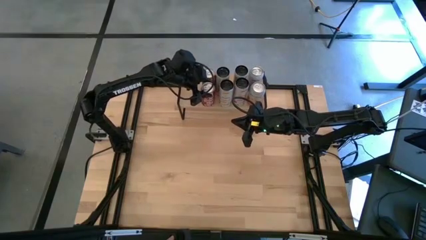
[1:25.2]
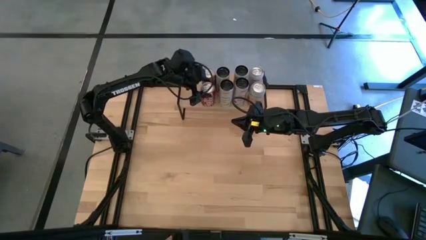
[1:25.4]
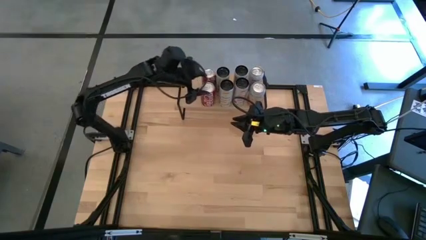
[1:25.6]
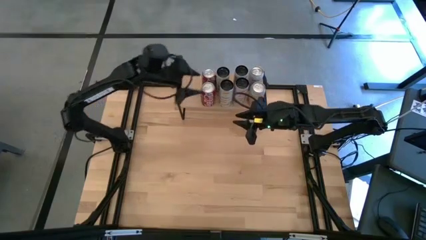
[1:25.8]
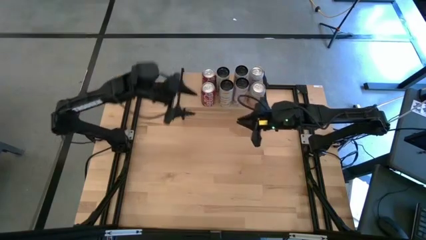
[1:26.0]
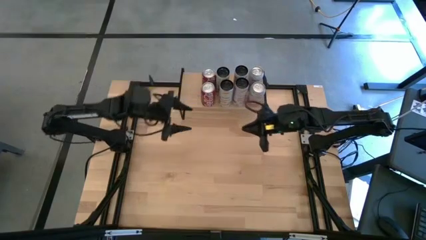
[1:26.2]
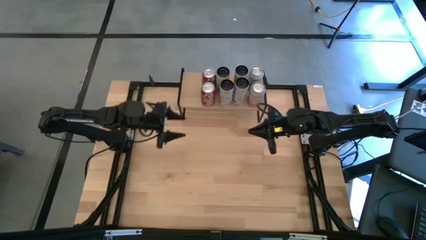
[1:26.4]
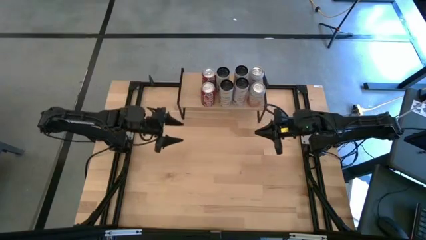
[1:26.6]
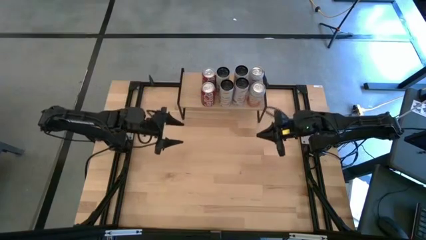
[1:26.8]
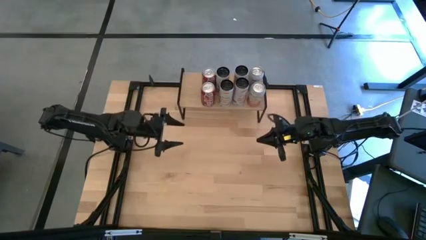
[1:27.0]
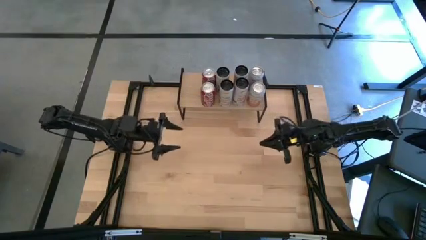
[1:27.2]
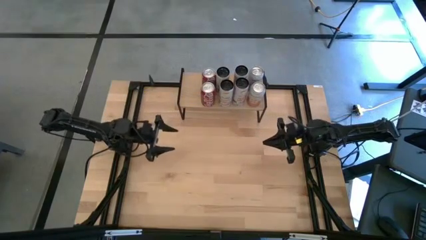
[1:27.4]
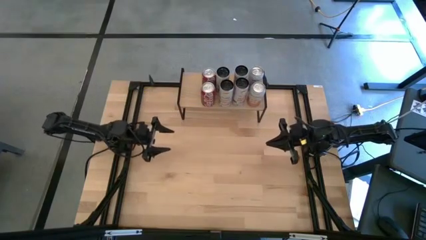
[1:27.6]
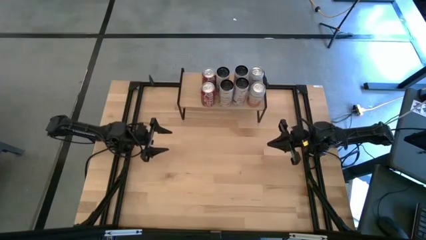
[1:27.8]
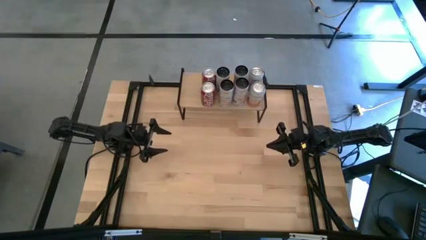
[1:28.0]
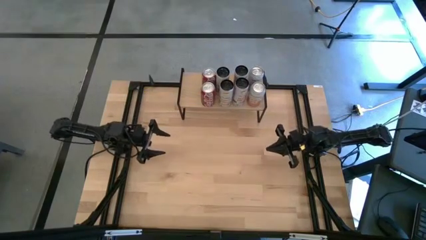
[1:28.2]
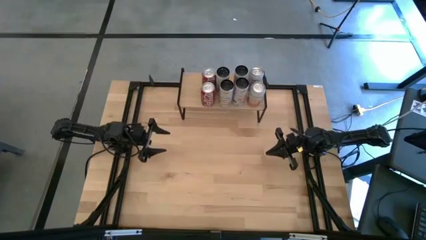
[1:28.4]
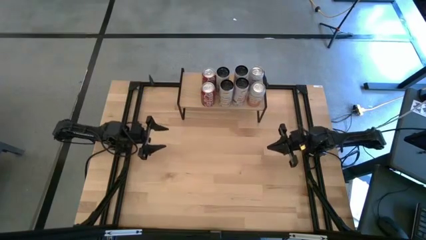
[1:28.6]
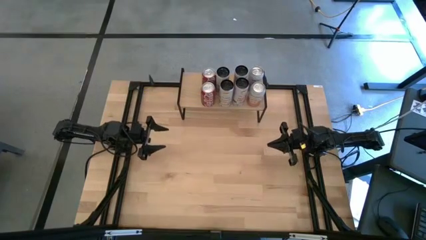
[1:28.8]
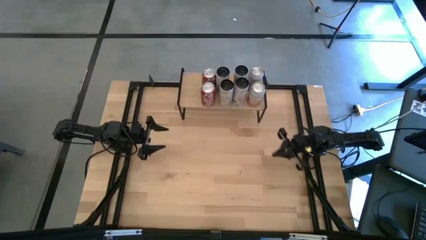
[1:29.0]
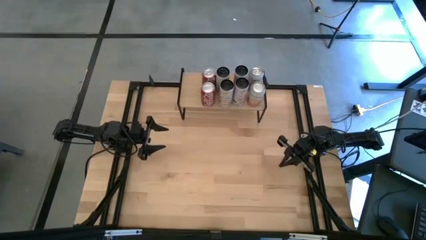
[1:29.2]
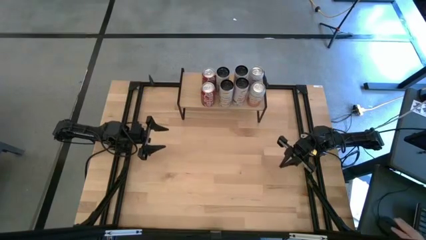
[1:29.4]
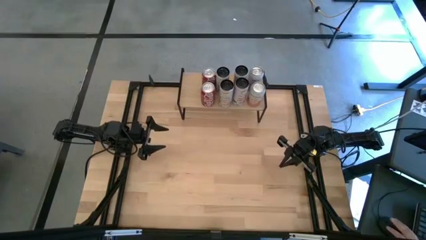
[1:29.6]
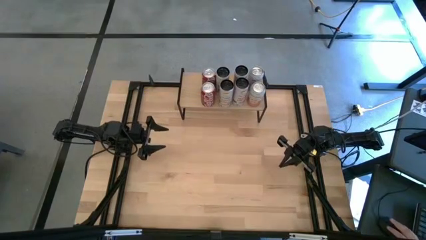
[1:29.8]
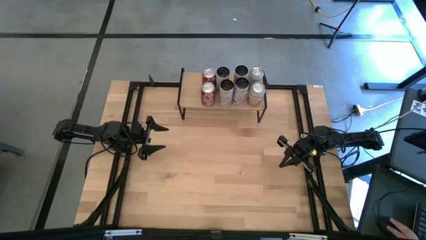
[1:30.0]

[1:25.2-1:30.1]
Task: Place canned beverage on shelf
Return to Home Position

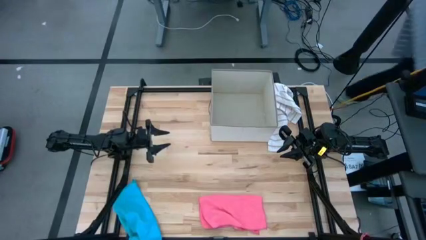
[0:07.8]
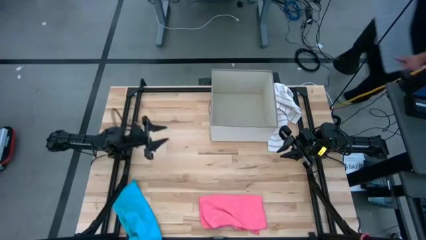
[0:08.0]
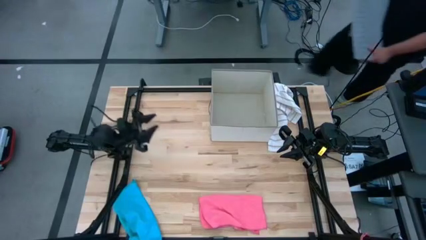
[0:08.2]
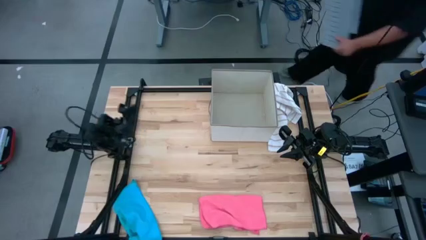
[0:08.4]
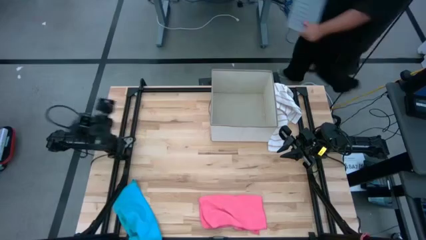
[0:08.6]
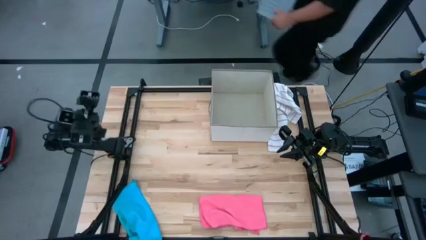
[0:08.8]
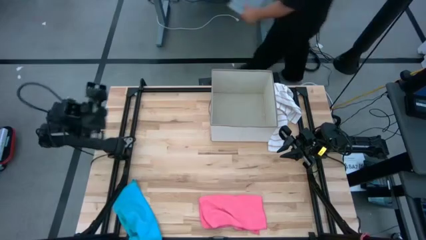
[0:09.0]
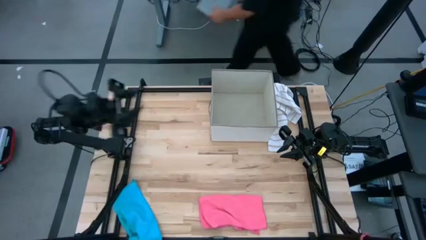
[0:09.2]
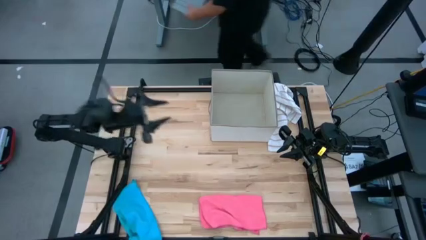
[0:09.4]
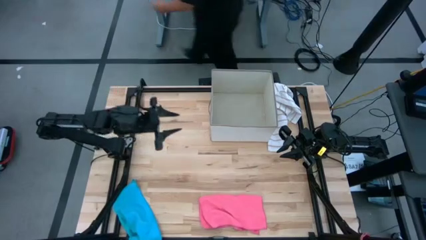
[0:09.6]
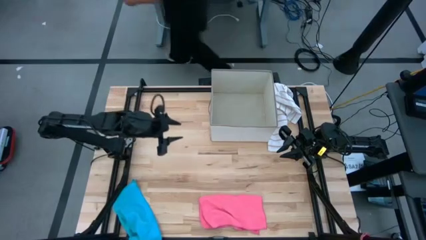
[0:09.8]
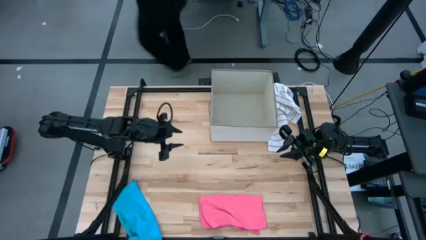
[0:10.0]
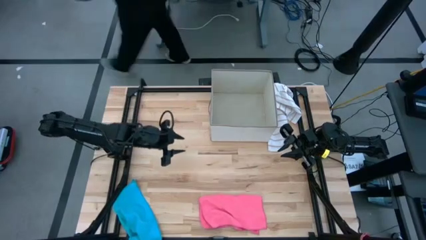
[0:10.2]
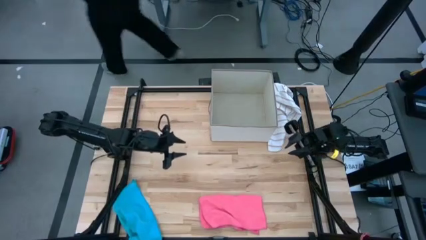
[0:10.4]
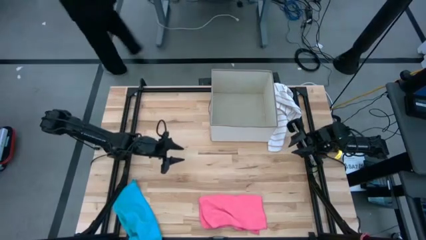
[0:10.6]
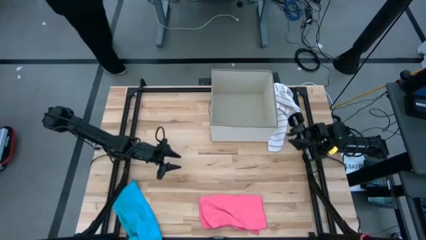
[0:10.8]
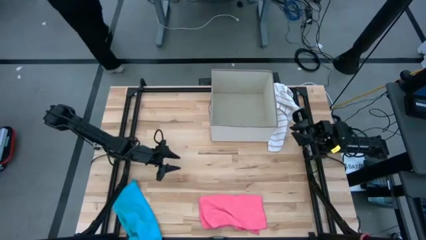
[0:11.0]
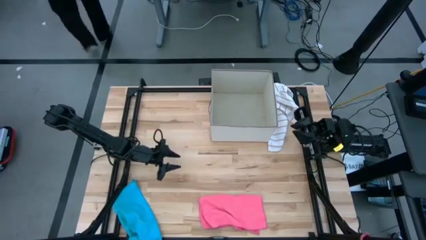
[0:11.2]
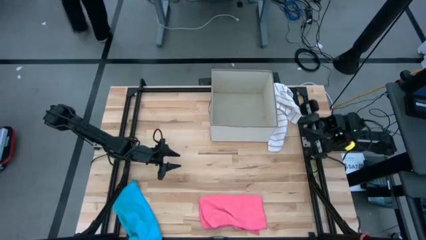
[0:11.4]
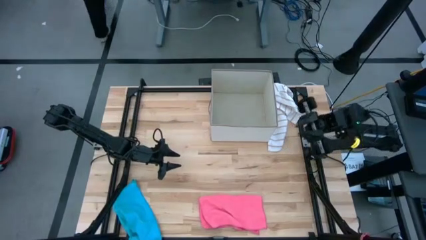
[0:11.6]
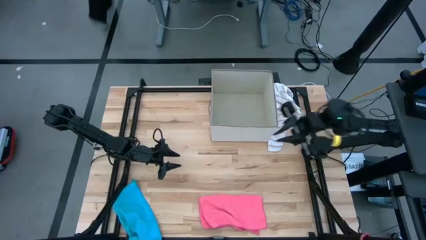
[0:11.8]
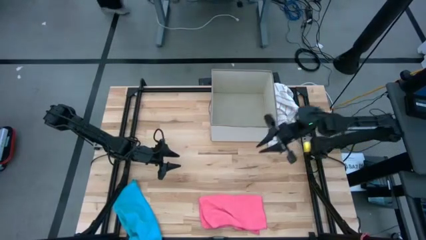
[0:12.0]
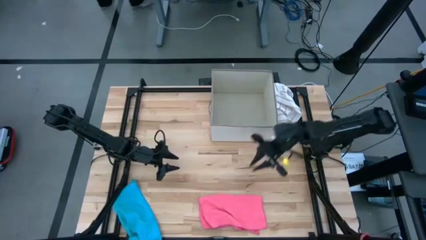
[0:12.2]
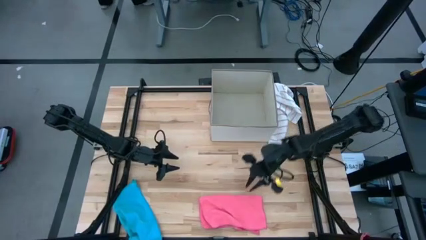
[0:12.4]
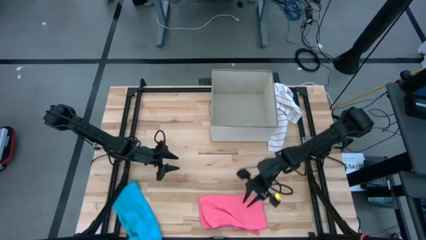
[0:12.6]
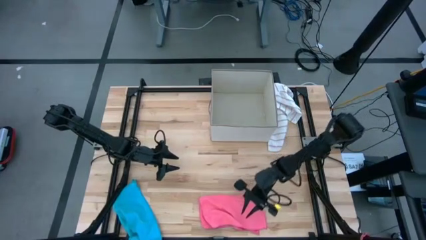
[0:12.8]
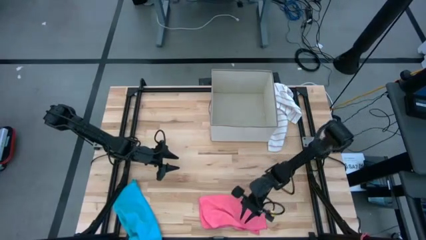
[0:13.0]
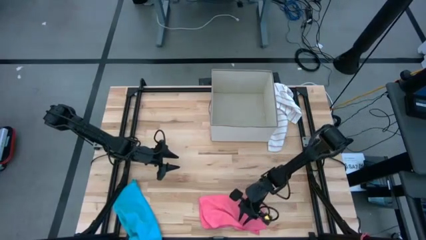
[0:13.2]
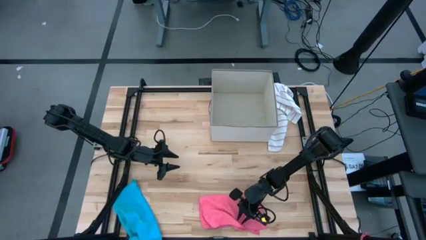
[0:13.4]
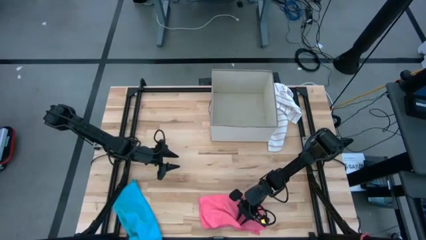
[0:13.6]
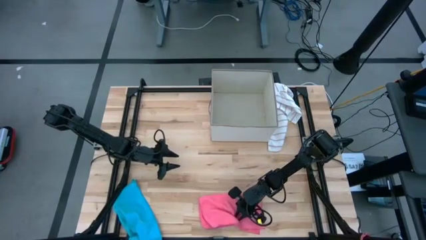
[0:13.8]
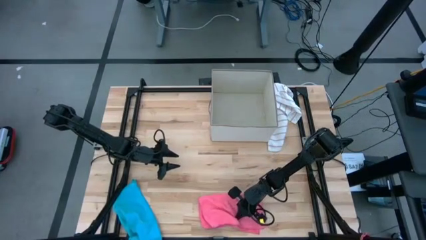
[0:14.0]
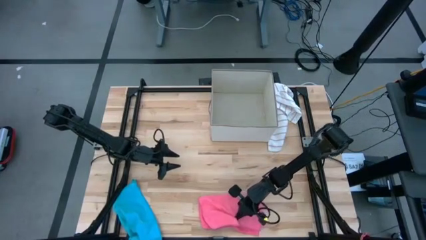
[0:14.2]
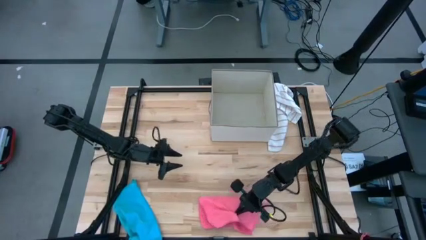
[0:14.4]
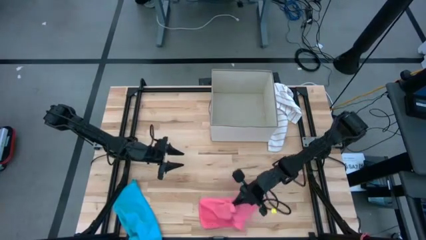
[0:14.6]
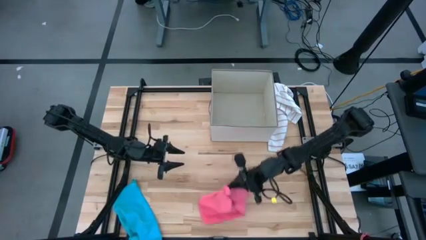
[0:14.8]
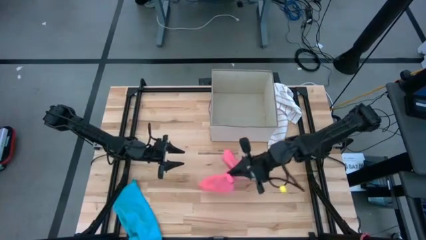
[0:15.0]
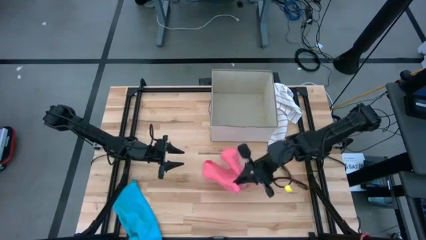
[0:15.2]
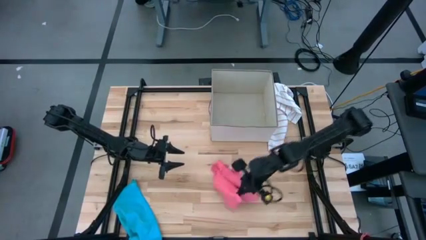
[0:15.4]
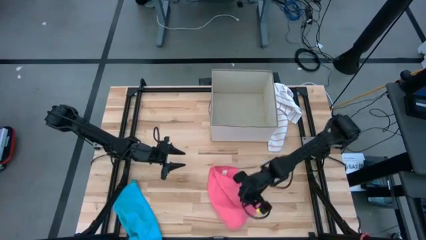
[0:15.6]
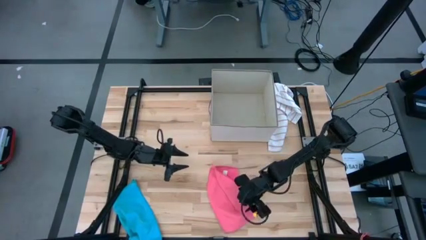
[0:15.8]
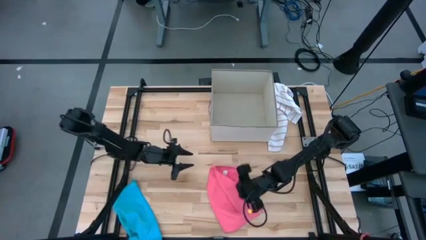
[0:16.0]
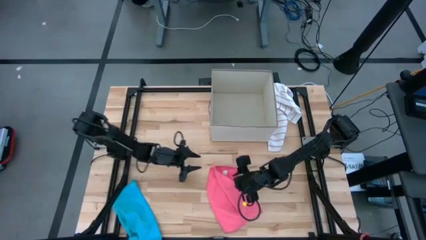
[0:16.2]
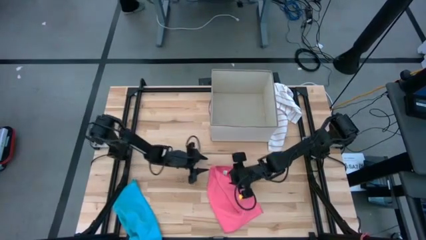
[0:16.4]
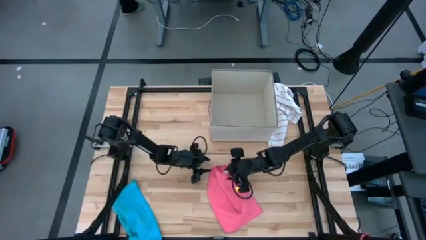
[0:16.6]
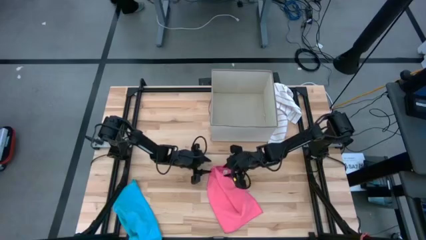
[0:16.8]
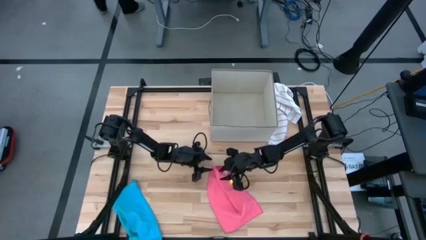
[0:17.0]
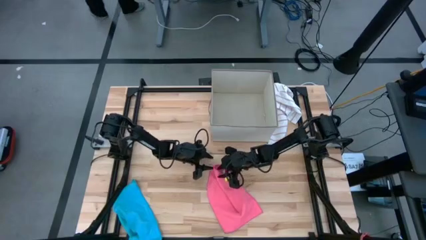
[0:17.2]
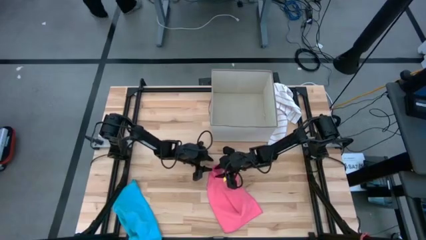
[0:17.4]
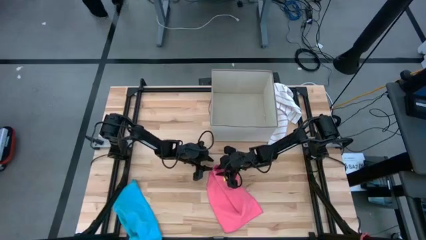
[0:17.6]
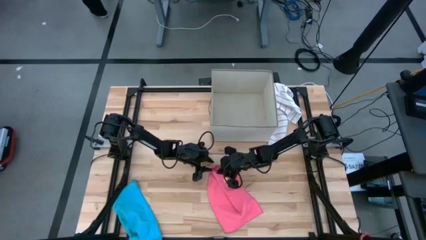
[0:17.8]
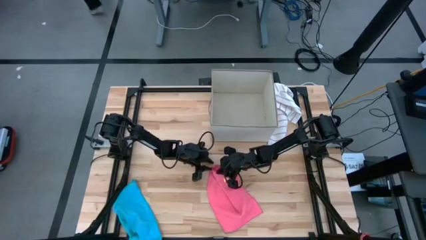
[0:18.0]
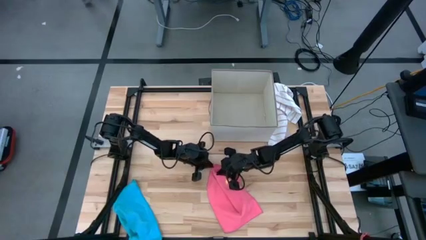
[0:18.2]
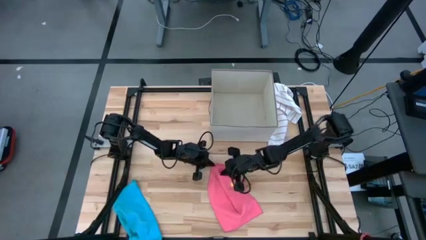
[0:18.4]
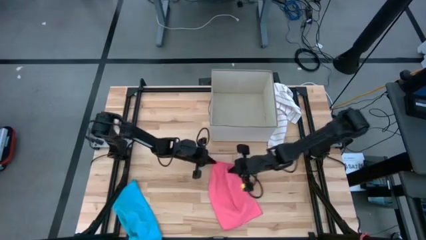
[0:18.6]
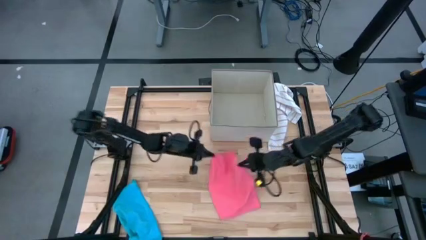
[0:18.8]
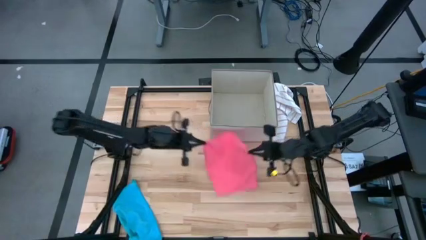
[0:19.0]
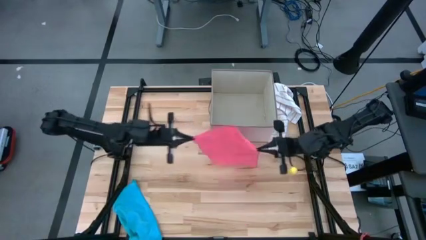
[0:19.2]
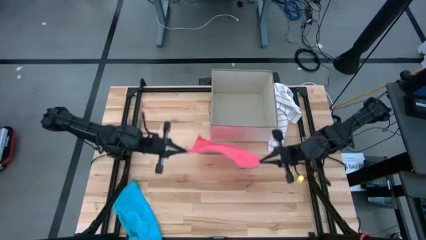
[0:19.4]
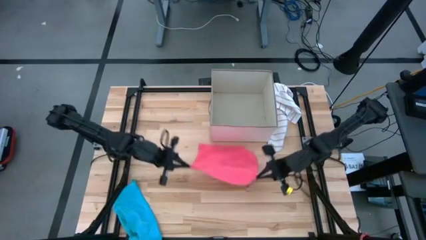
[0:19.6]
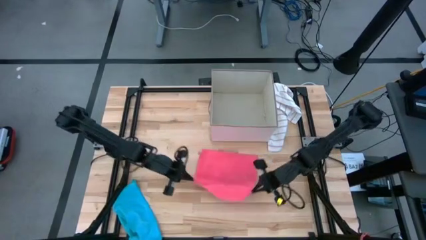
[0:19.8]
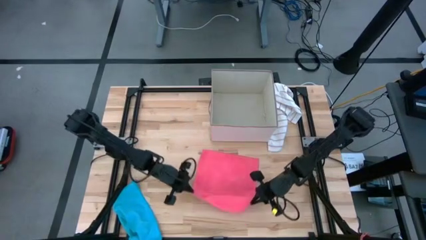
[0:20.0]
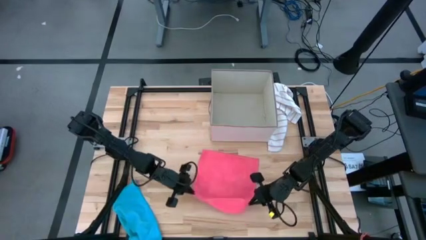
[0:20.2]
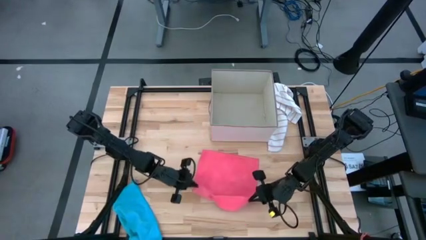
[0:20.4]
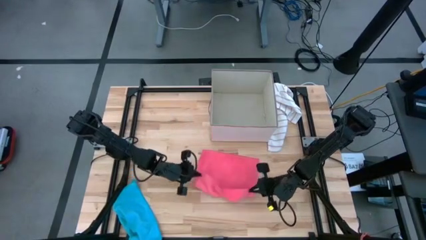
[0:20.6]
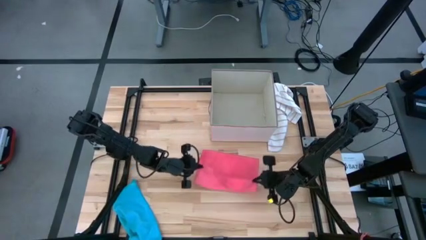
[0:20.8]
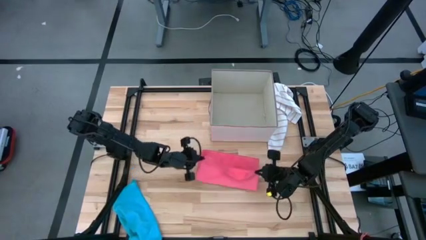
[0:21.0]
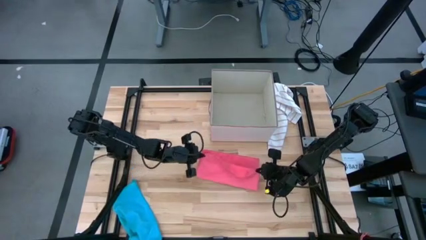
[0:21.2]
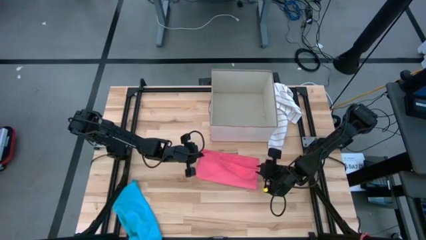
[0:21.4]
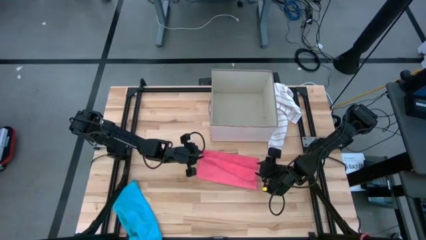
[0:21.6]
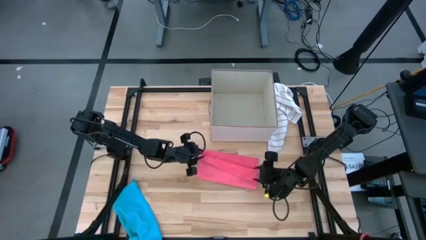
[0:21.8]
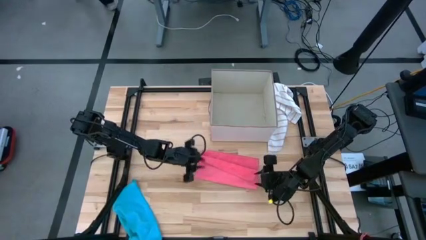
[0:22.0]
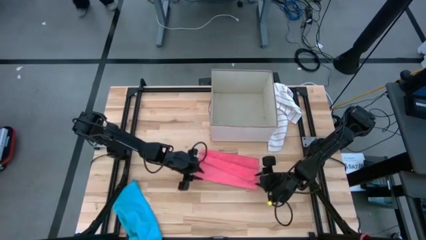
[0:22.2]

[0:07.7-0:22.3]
Task: Fold towel
Fold the pink microfiber towel
